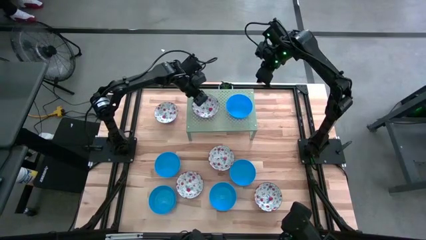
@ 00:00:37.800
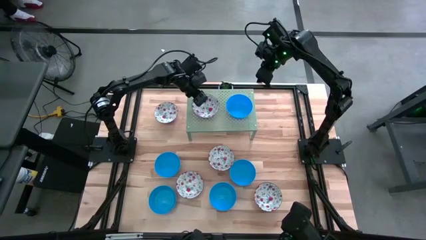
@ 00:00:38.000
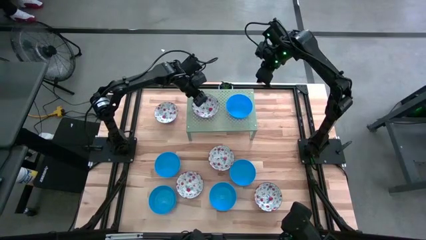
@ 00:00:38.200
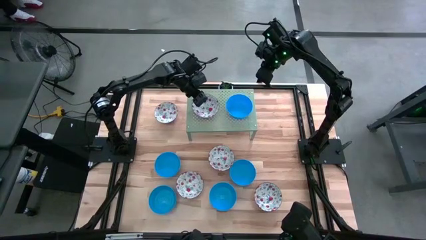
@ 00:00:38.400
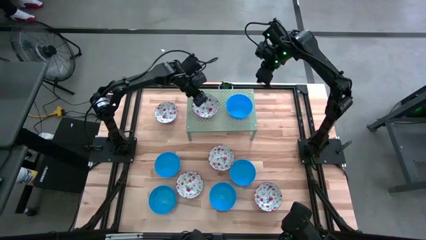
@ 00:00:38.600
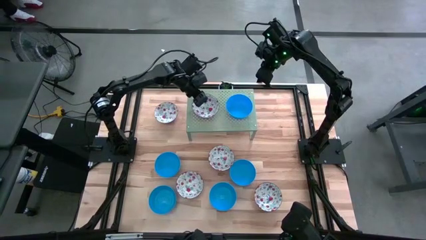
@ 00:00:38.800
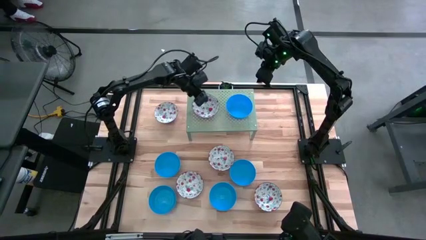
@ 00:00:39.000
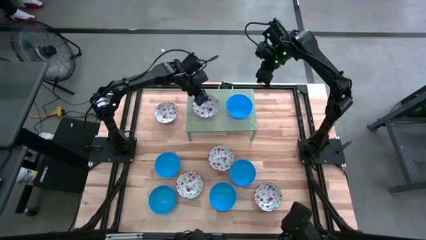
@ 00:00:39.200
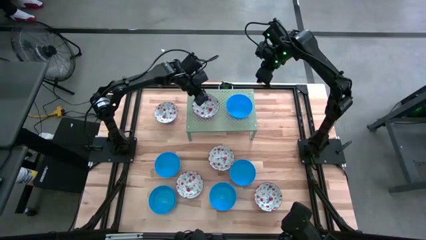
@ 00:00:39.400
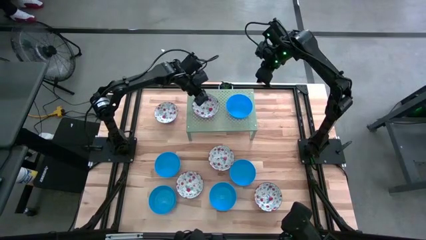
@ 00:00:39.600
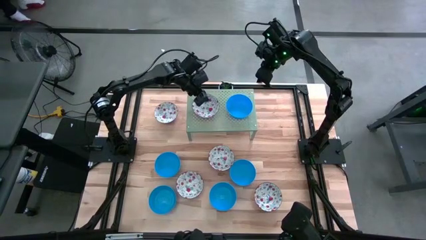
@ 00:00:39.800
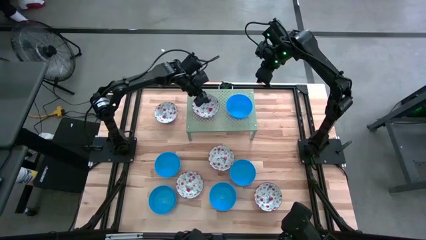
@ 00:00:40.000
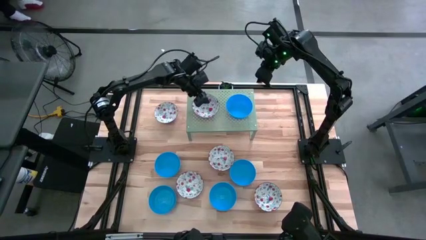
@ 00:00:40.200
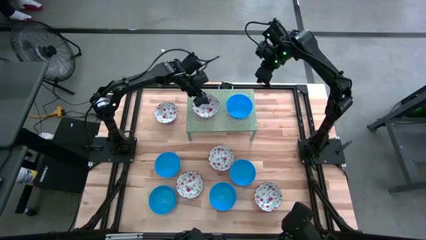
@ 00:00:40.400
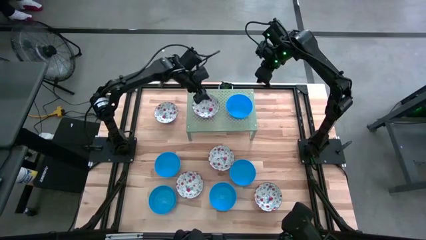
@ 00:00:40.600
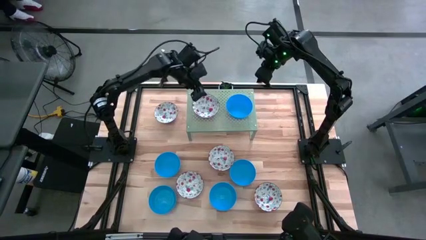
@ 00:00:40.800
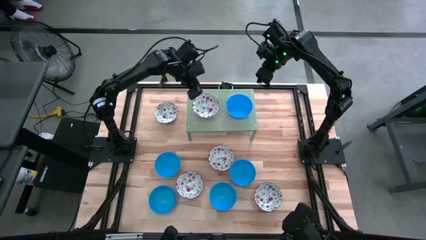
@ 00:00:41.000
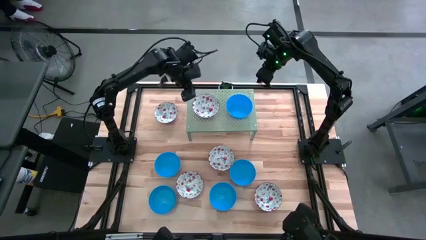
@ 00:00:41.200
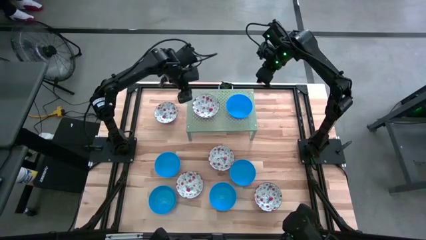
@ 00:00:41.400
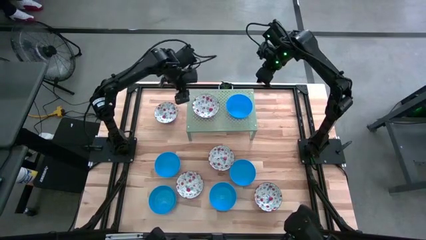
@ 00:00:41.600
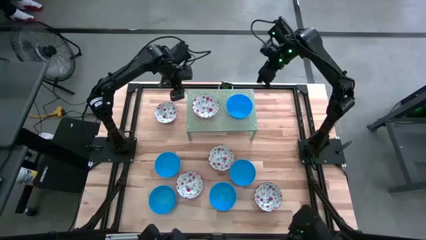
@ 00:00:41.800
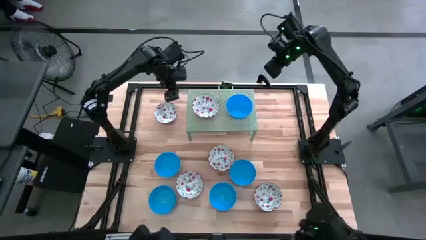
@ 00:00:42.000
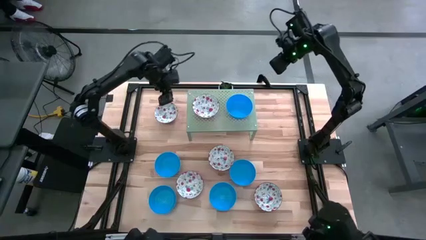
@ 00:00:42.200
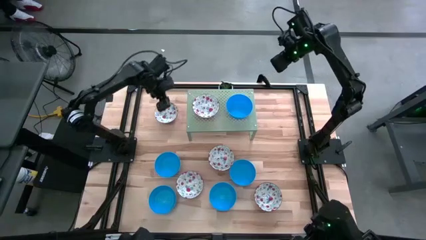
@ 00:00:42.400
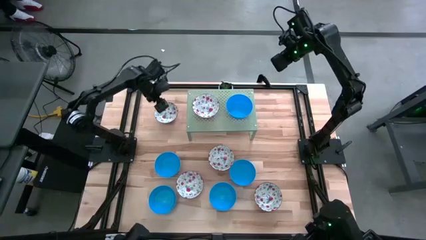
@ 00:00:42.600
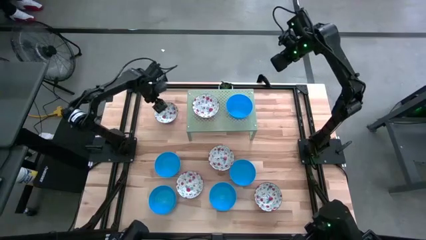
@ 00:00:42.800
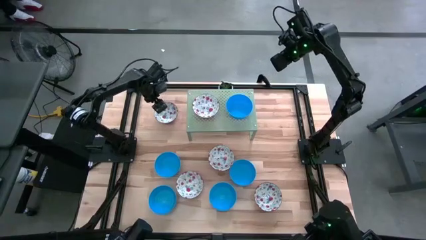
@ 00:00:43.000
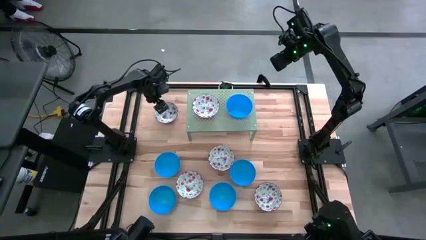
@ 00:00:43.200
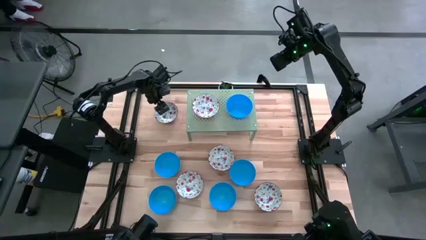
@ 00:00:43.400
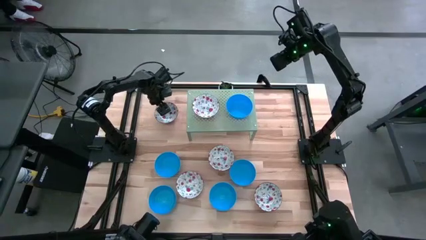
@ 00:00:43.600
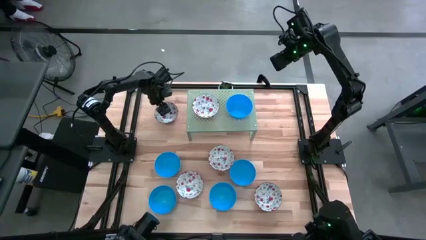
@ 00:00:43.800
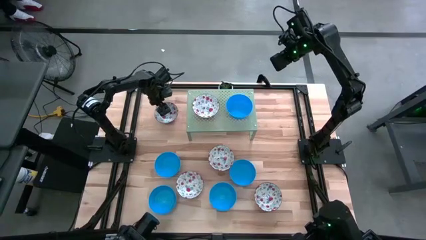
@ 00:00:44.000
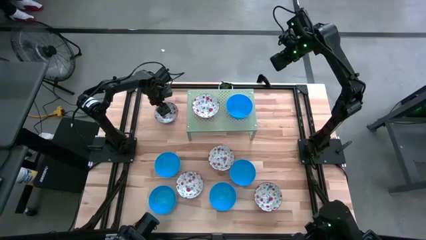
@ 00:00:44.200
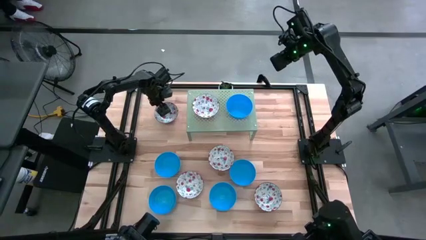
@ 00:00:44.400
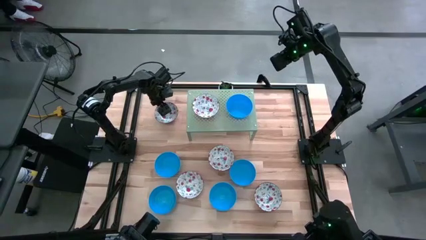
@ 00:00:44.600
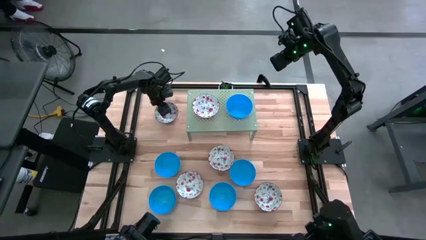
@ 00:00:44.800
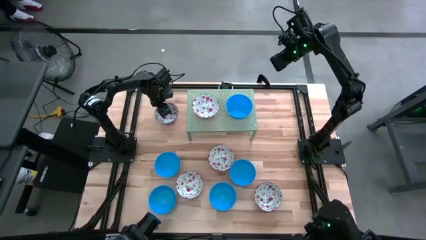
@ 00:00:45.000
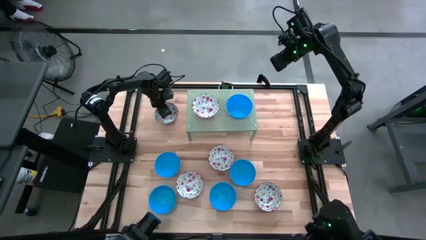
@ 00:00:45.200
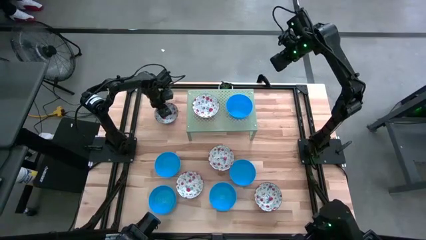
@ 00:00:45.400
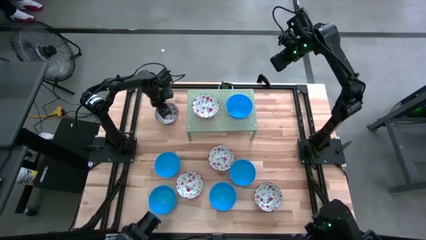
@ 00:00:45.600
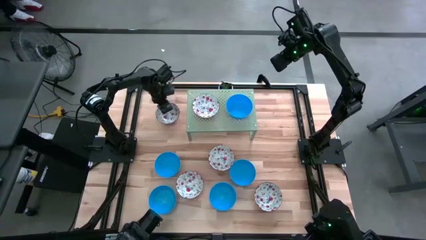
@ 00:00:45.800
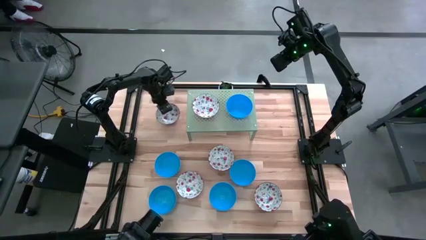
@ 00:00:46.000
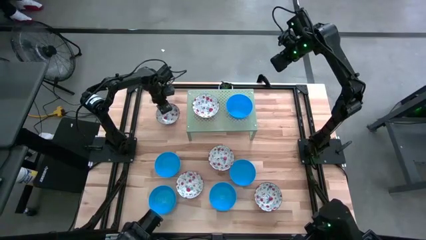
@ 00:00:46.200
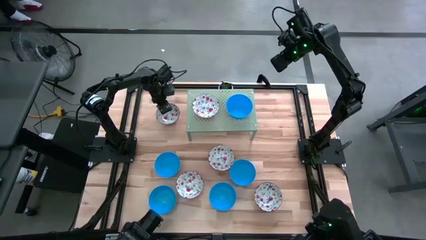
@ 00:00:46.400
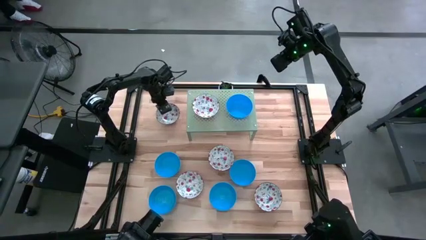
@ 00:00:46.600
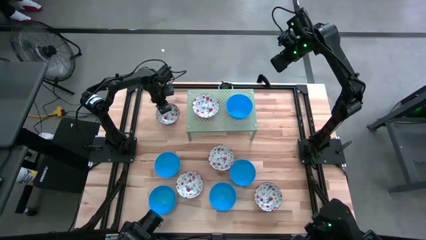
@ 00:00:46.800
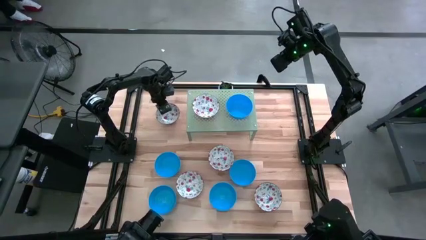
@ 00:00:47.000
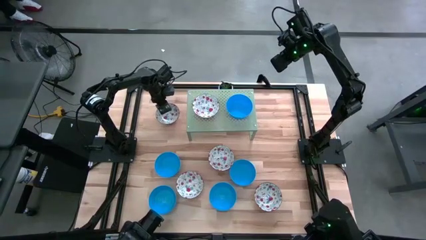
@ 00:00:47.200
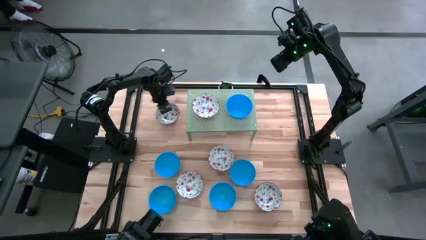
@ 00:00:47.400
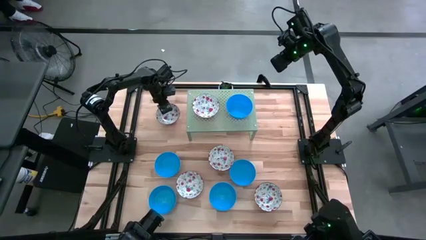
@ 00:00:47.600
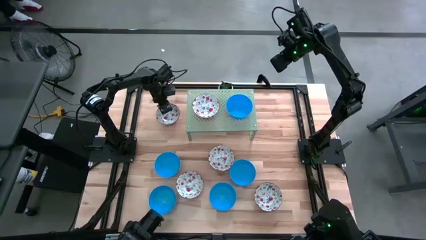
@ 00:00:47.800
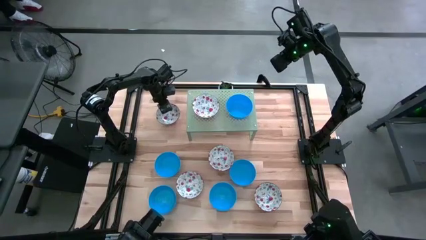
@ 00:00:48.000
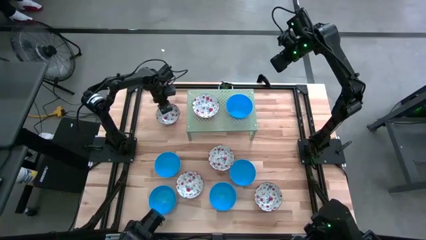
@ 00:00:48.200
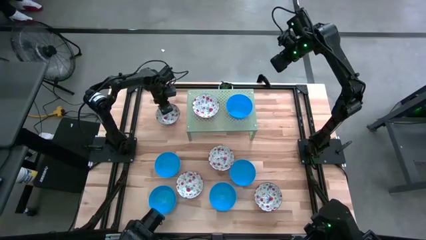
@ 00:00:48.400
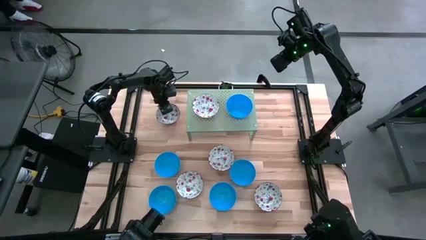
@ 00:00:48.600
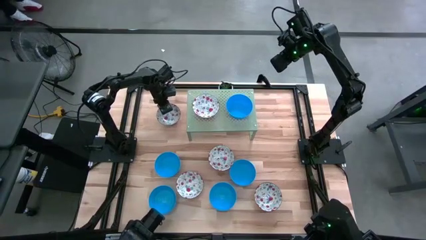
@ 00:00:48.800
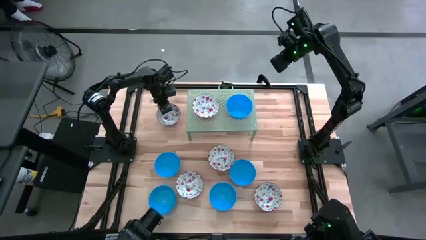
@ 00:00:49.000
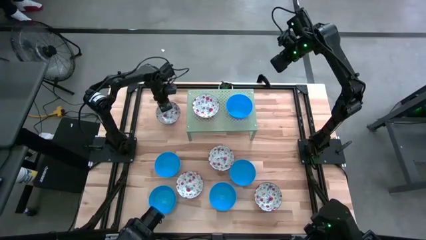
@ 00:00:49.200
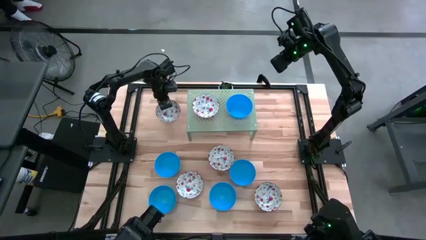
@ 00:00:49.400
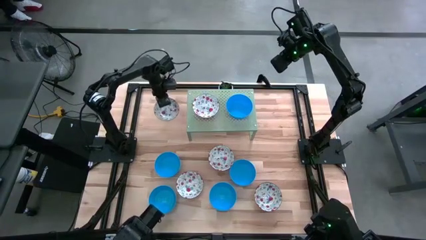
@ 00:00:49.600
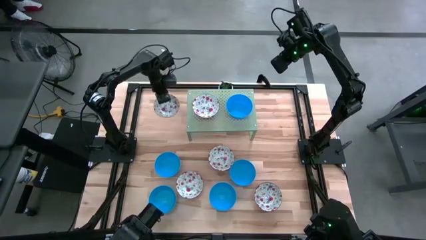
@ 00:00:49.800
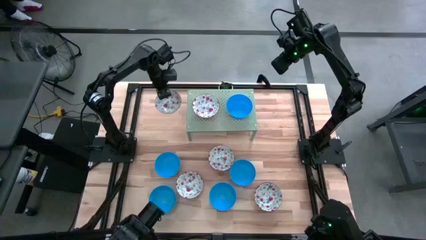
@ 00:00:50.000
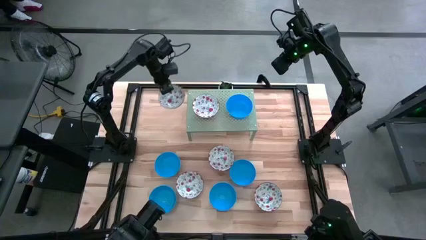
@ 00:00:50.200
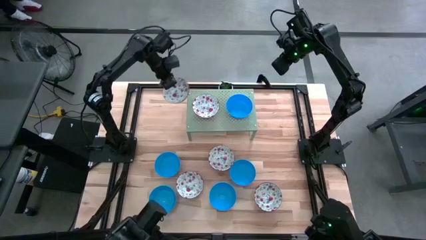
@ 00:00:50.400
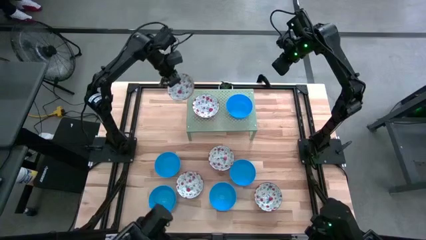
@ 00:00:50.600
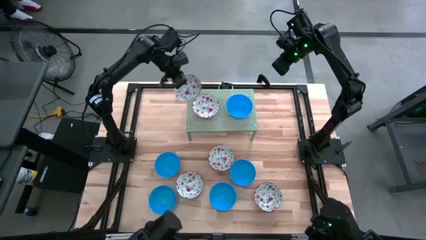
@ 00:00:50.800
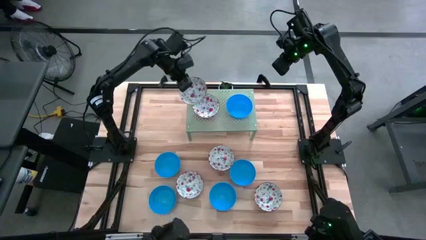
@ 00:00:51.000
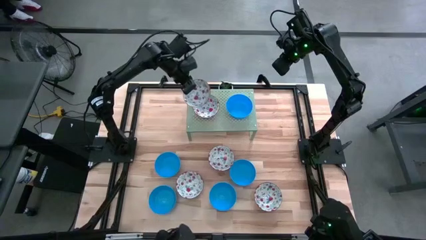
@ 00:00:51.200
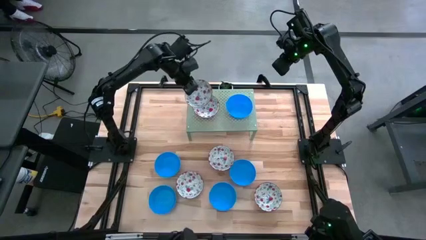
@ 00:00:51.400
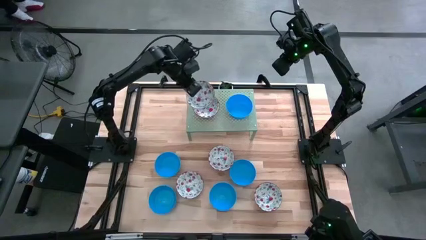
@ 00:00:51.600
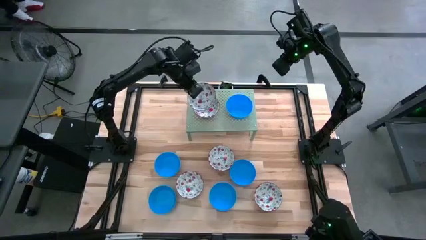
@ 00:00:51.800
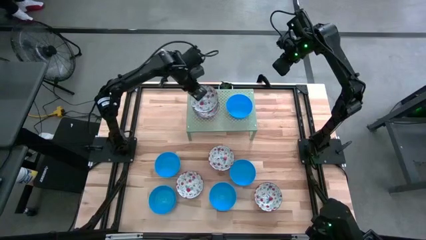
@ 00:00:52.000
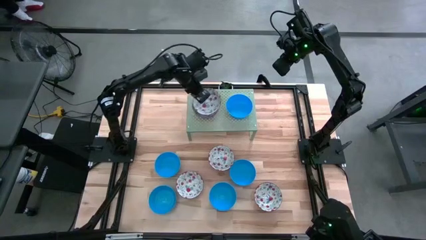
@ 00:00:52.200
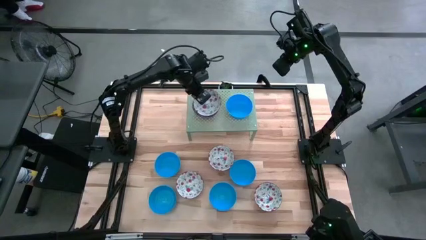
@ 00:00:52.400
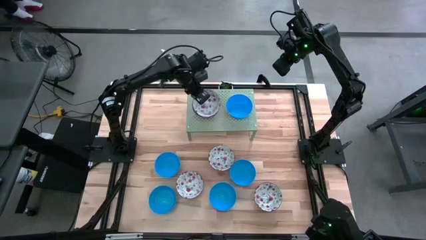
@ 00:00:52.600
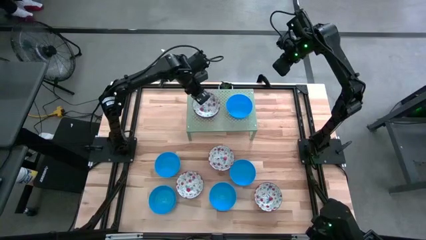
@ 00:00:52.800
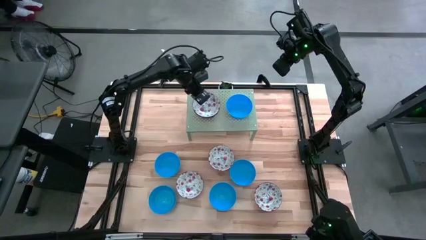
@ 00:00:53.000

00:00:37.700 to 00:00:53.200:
Task: Pick & Place Mini bowls
Stack the patterned red bowl on the patterned red bowl on the shelf
